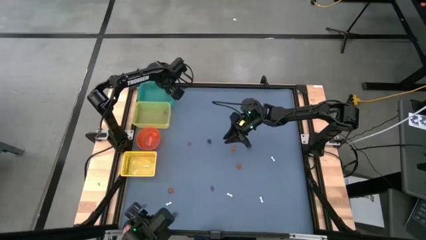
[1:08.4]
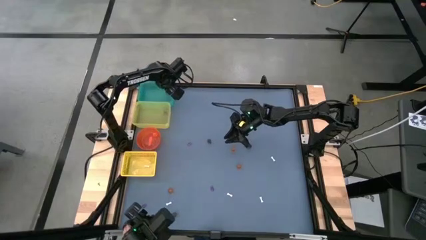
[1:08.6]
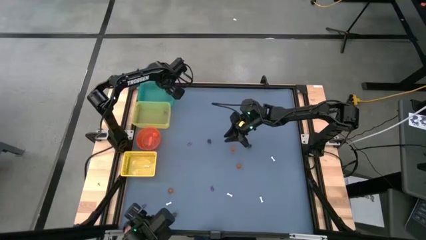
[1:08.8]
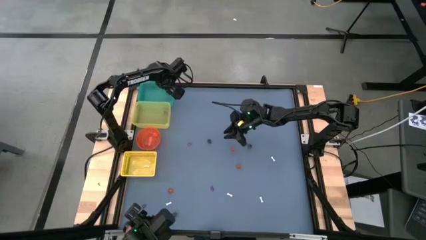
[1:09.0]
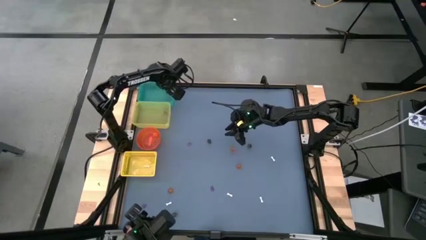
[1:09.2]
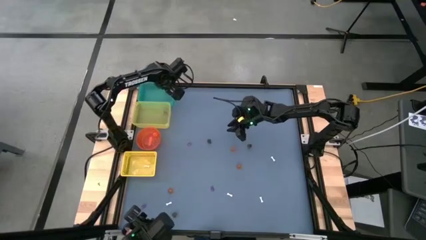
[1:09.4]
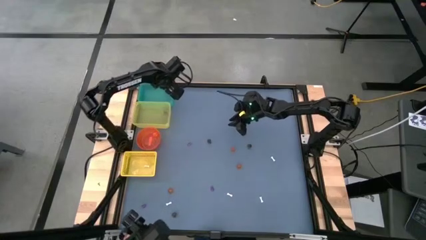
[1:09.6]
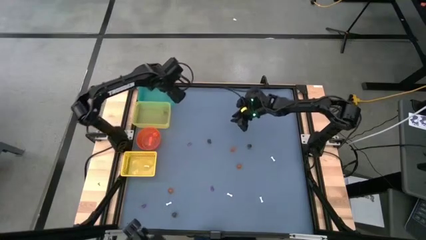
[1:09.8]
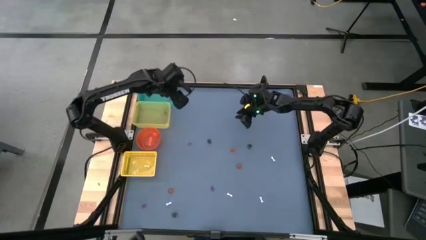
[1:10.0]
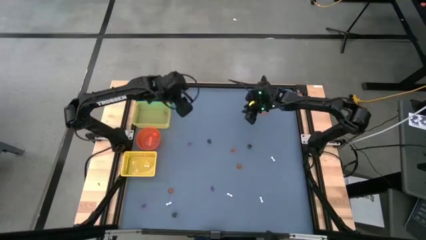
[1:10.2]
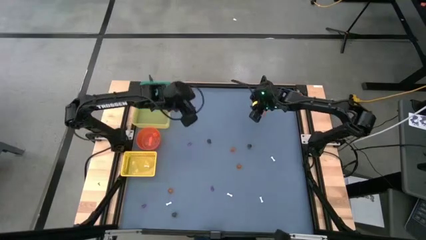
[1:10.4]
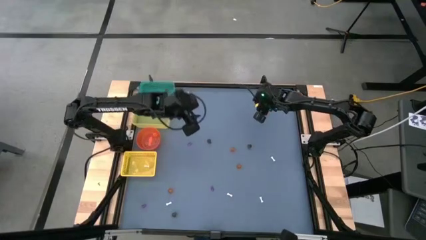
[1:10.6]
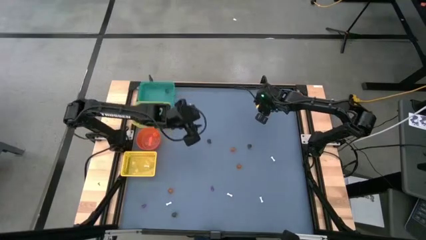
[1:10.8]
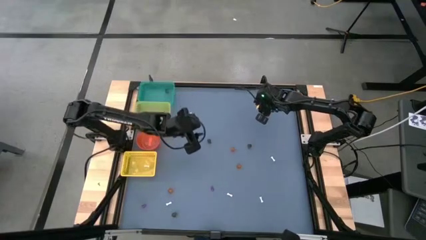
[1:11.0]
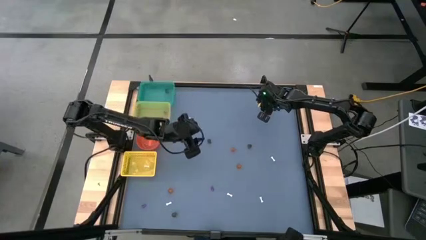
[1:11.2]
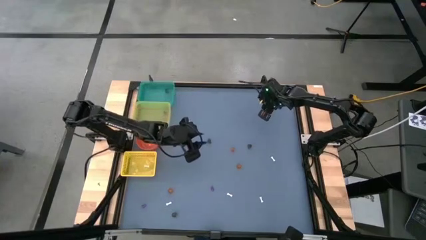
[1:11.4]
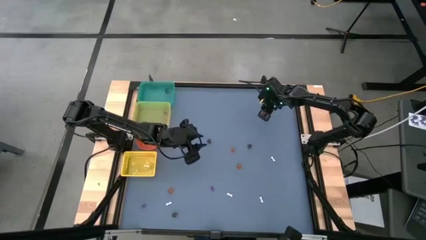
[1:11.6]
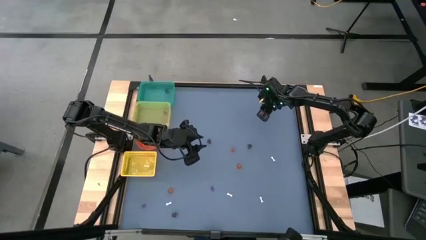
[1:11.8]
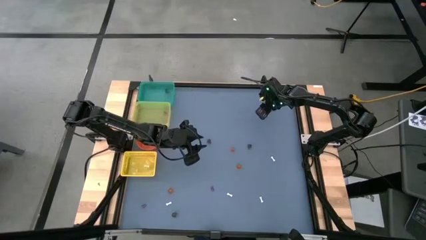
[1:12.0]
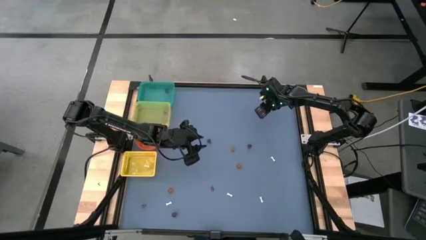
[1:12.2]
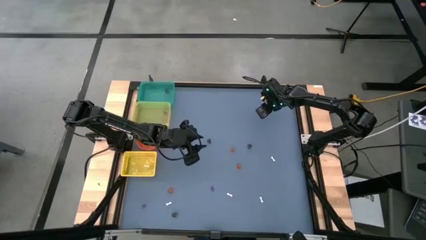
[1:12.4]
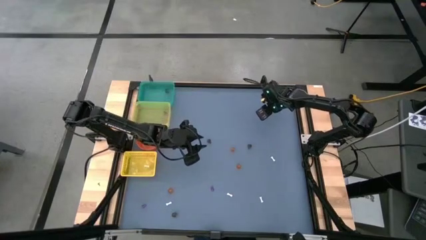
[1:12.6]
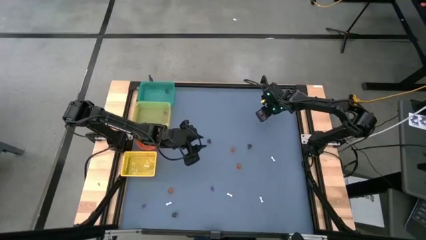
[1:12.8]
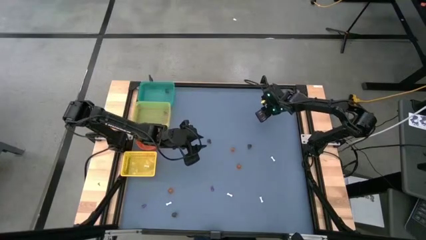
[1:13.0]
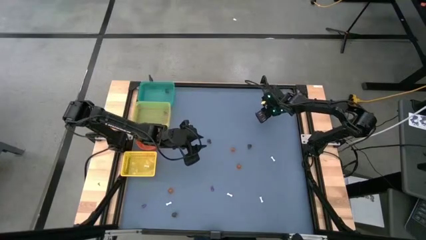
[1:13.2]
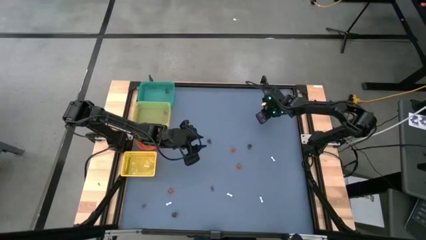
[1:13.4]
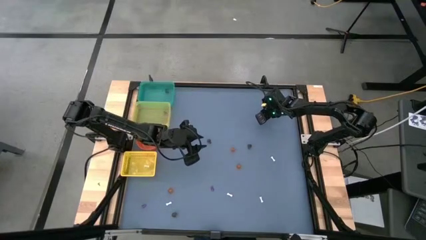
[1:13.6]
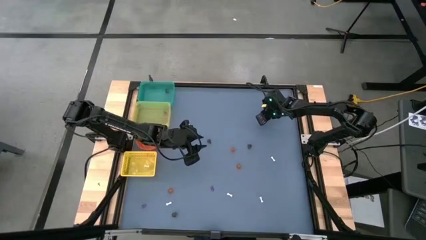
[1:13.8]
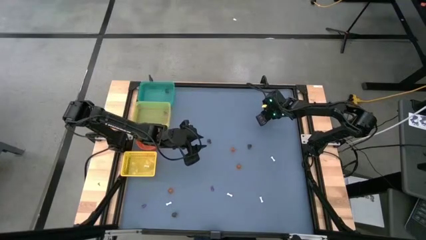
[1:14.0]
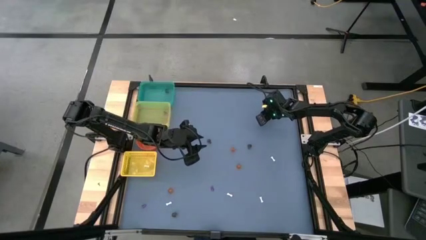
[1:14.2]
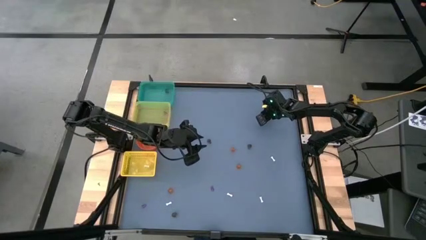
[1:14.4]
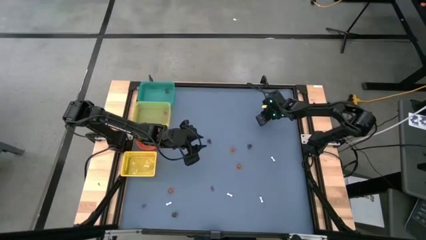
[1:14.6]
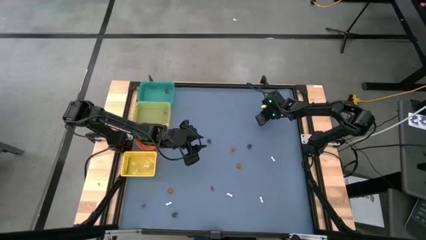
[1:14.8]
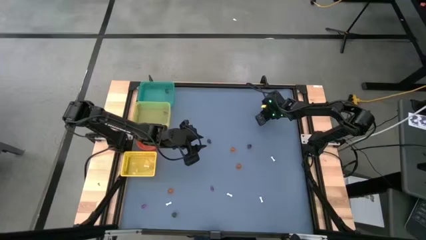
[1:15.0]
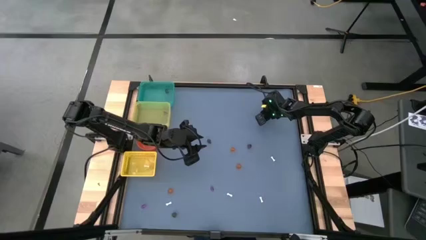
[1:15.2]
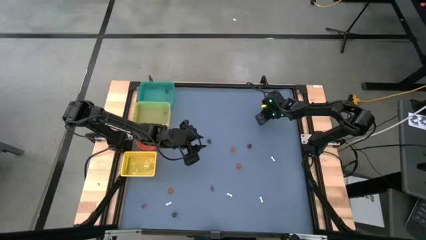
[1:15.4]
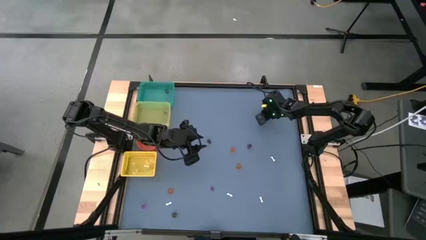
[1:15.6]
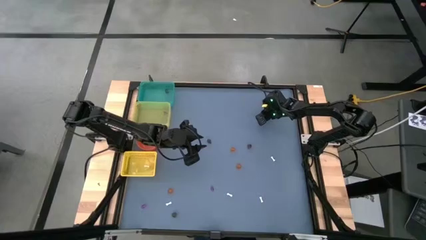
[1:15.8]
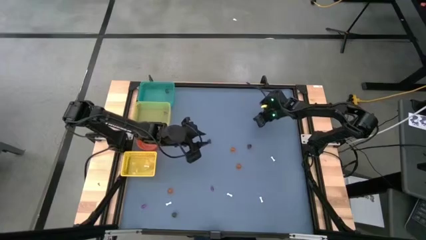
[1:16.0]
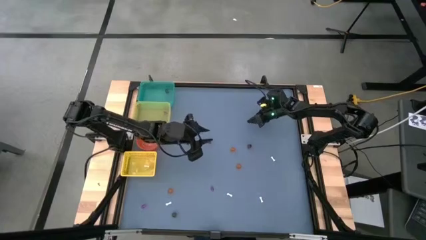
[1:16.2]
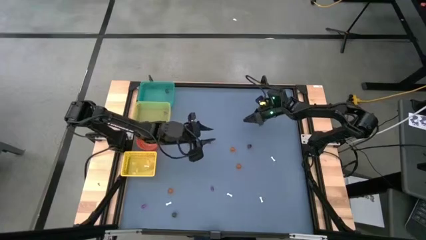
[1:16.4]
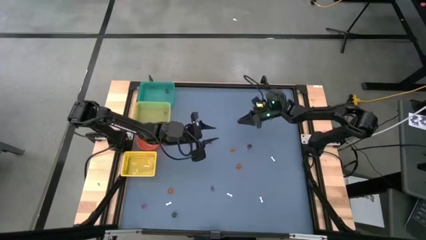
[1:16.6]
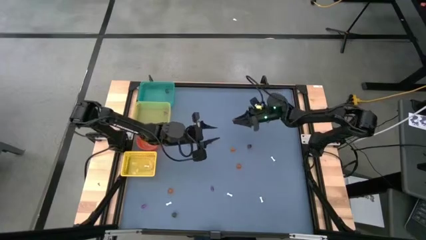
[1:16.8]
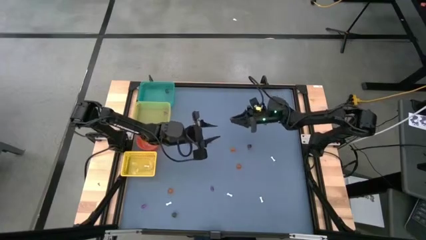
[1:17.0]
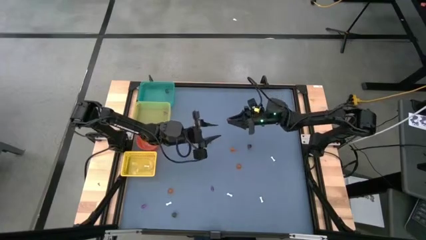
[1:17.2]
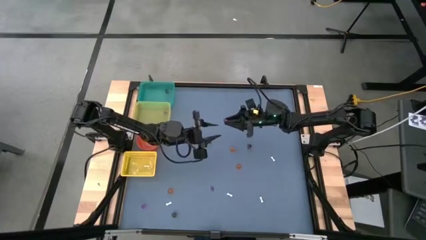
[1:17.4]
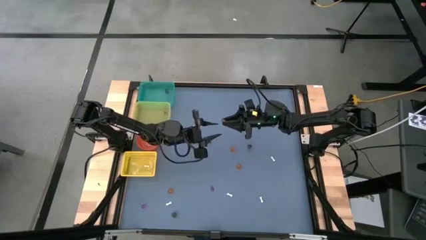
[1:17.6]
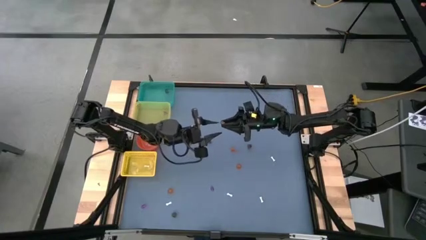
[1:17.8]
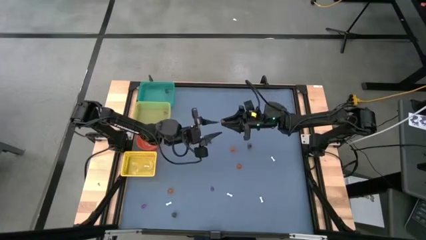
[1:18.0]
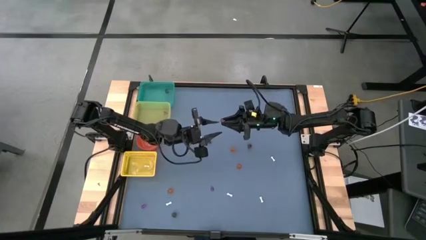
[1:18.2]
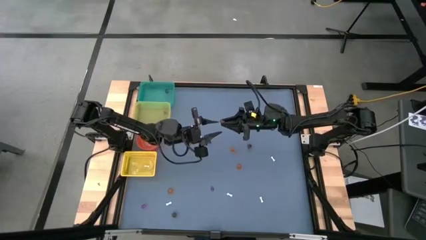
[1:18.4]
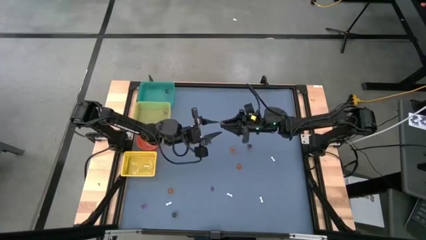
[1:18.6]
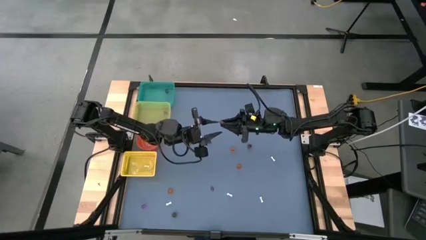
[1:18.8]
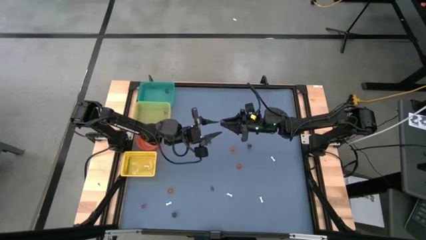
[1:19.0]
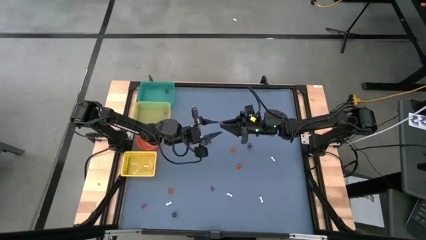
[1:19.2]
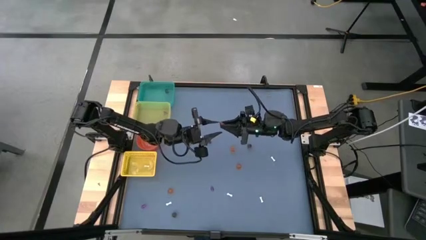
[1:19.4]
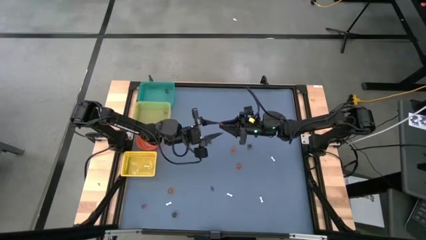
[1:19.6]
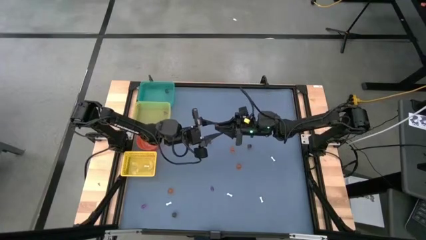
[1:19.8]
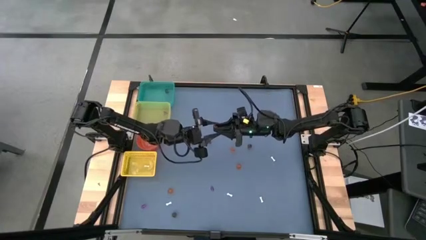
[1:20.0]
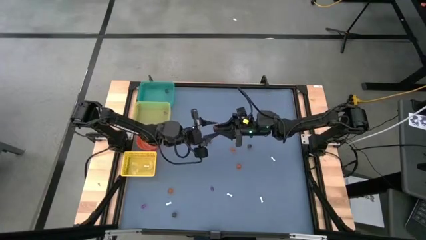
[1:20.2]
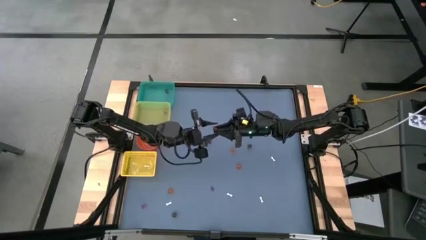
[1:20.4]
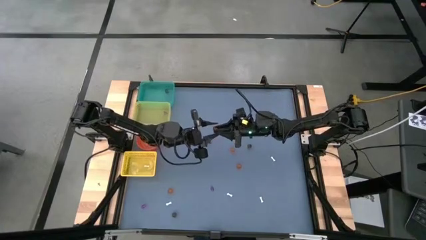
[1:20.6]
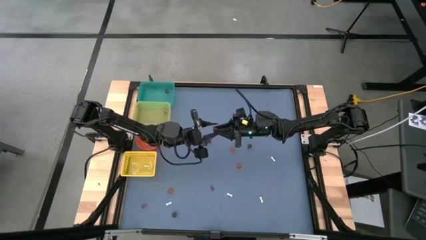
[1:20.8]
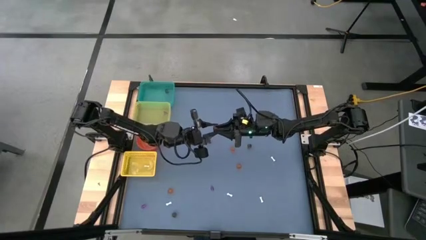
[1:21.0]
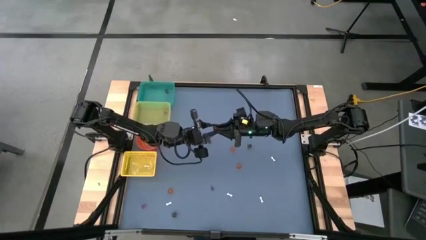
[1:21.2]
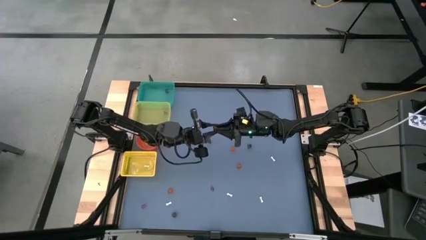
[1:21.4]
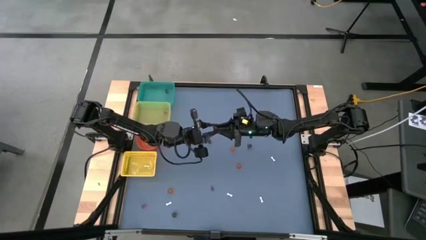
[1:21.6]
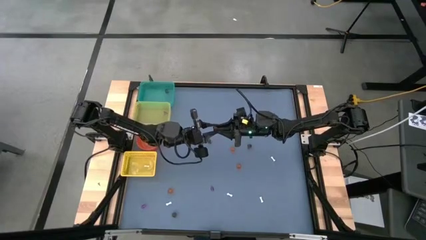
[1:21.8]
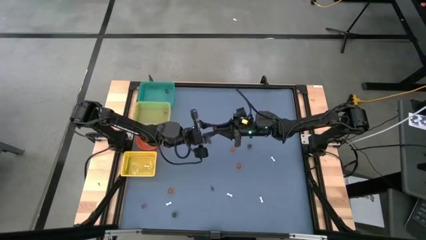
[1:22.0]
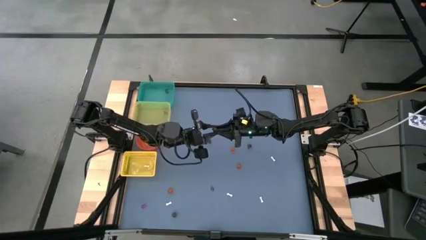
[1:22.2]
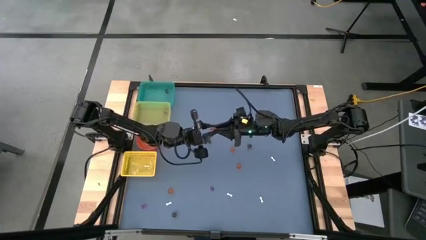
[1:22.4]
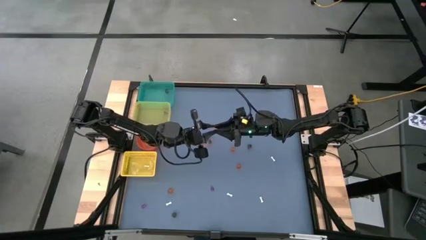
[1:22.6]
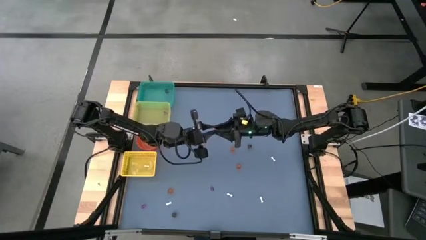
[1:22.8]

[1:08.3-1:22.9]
Task: Sort Halloween decoration
Put the top right orange pumpkin toy into the orange bin

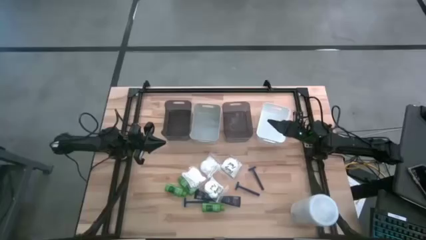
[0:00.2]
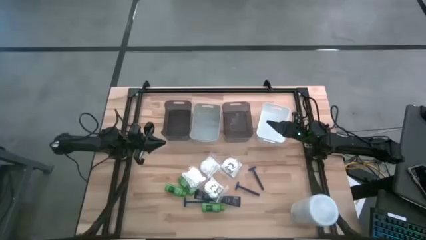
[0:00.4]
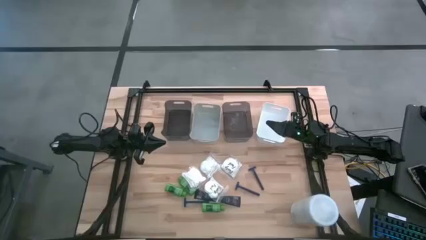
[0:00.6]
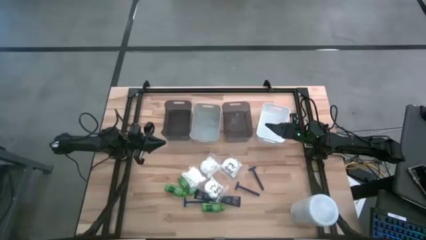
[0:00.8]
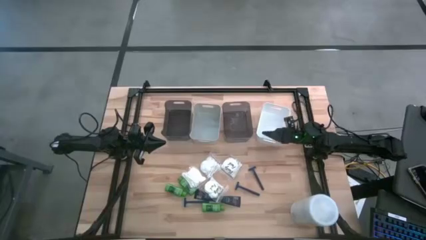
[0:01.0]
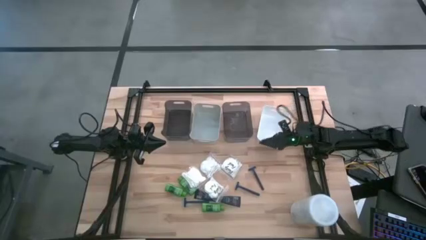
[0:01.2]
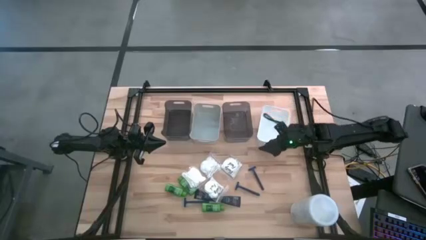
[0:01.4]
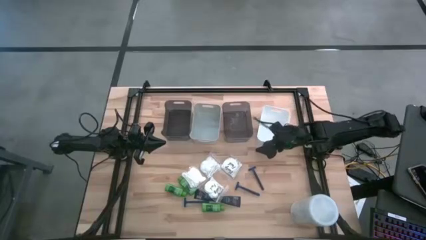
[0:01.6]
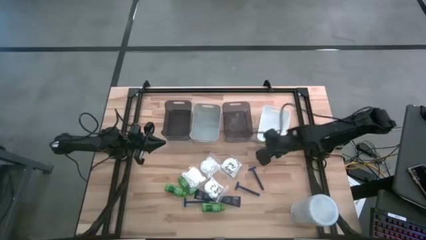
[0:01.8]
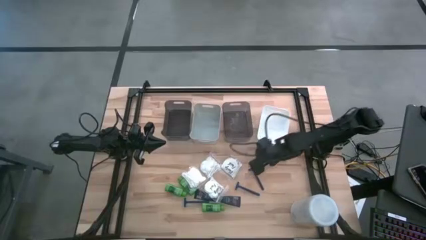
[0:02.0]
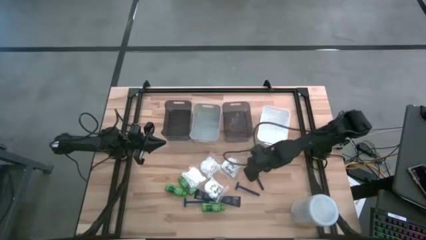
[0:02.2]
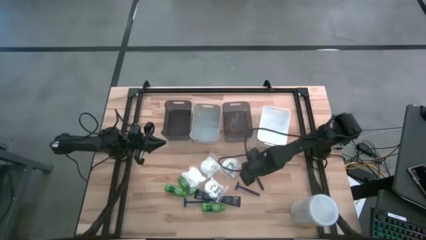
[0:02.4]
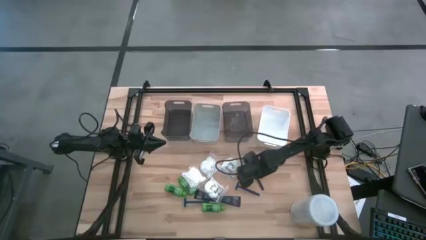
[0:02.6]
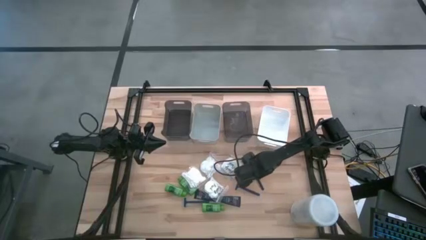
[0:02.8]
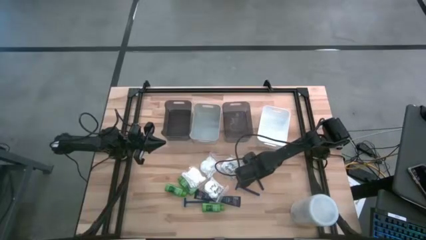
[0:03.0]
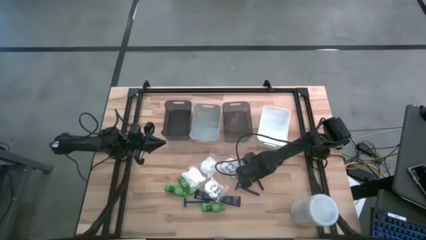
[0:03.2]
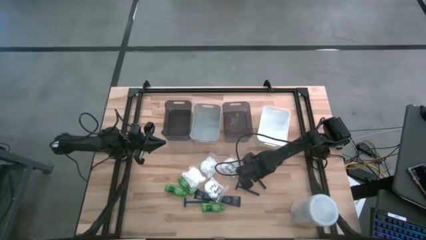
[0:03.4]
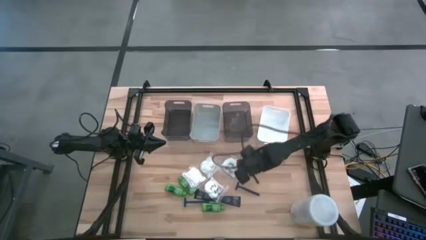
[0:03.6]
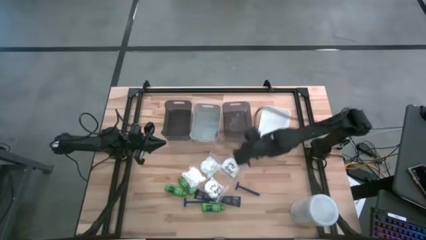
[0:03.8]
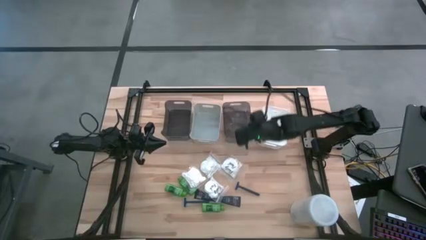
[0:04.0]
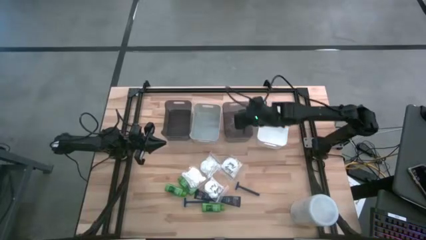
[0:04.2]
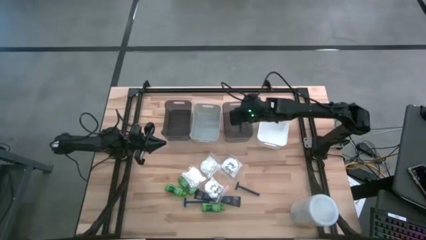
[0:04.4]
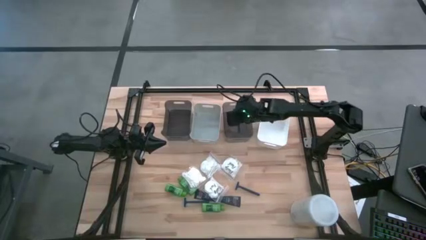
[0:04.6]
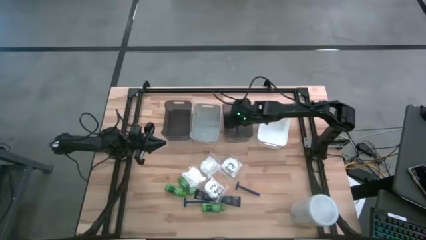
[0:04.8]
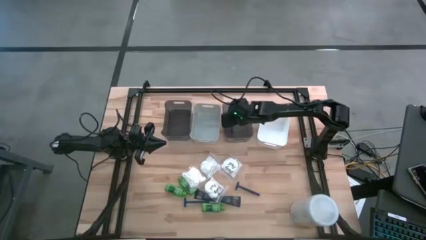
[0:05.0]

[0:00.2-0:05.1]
Task: Pick & Place Travel size toiletries
Put the blue razor into the right black bin
